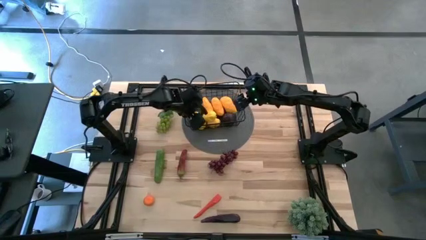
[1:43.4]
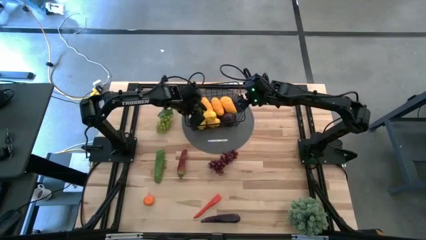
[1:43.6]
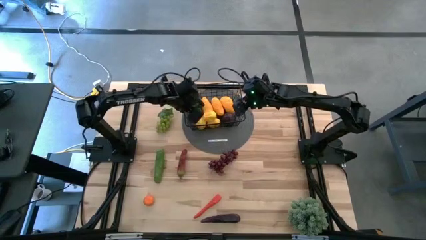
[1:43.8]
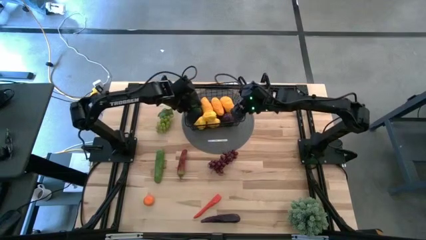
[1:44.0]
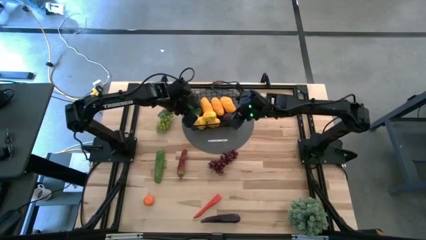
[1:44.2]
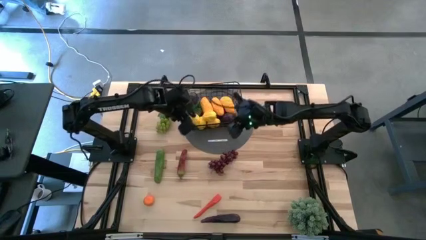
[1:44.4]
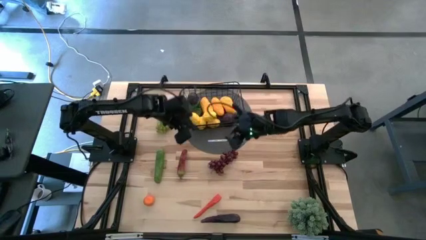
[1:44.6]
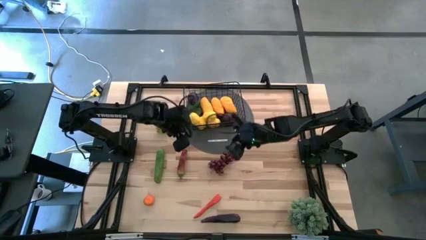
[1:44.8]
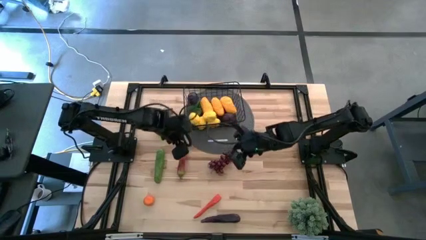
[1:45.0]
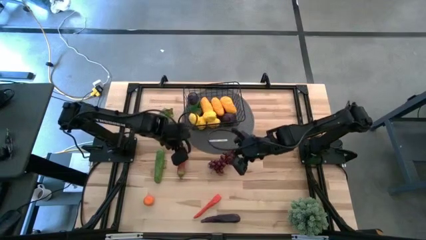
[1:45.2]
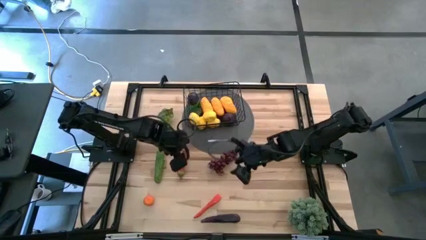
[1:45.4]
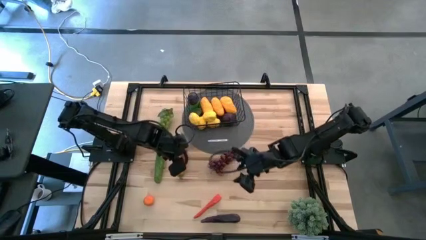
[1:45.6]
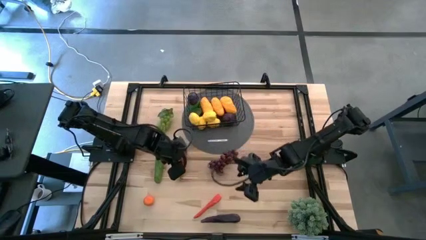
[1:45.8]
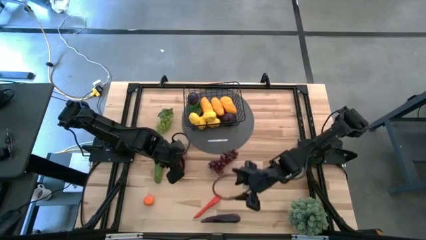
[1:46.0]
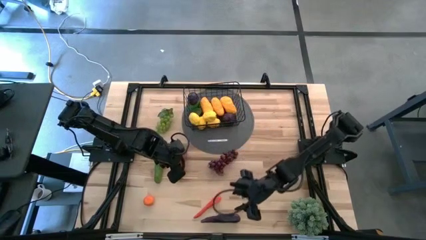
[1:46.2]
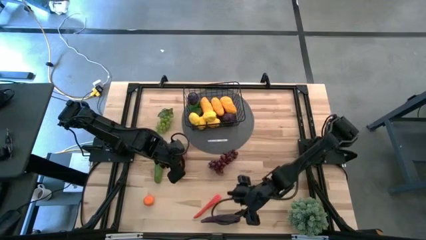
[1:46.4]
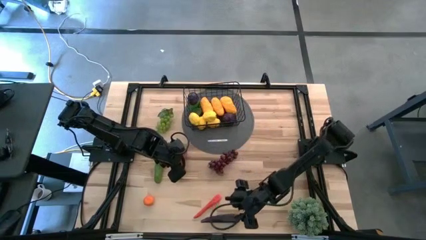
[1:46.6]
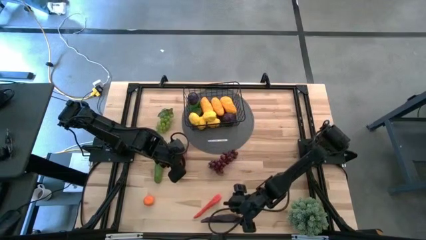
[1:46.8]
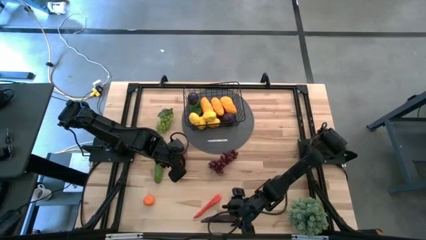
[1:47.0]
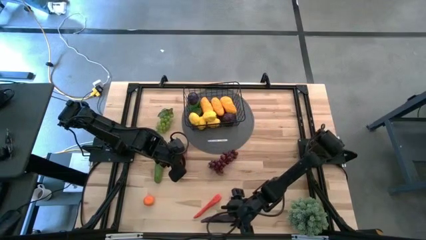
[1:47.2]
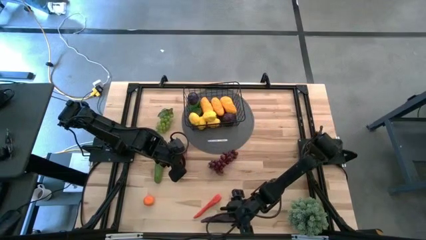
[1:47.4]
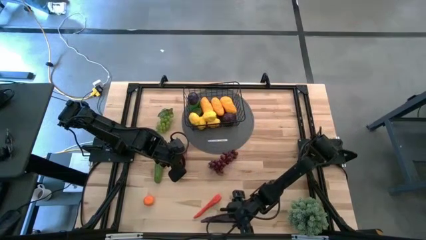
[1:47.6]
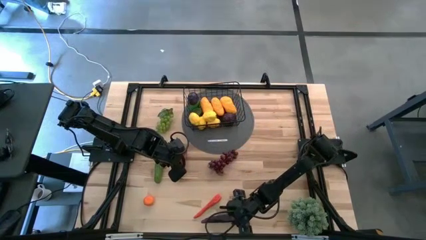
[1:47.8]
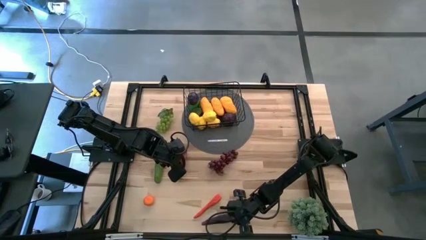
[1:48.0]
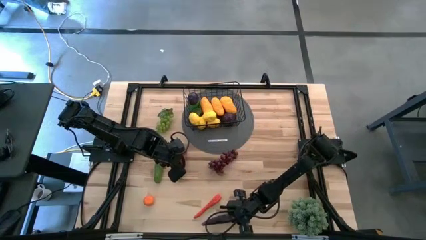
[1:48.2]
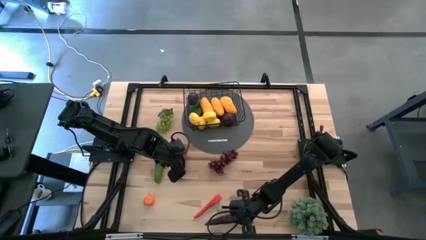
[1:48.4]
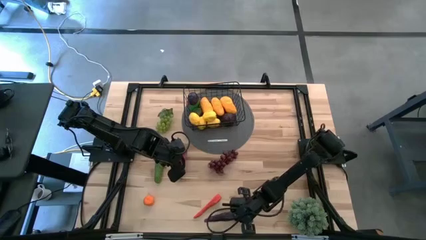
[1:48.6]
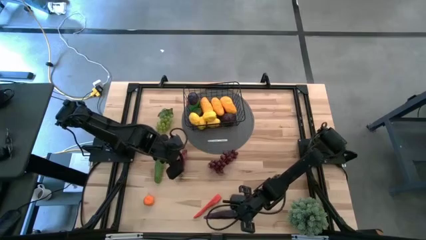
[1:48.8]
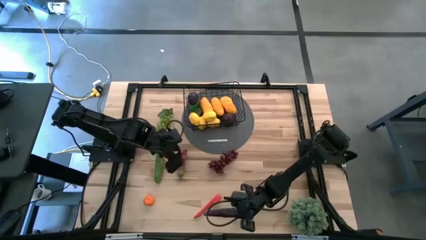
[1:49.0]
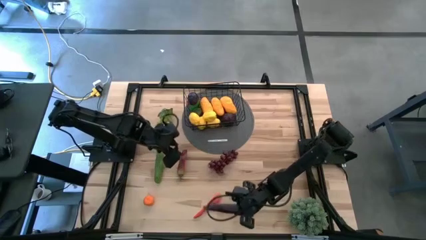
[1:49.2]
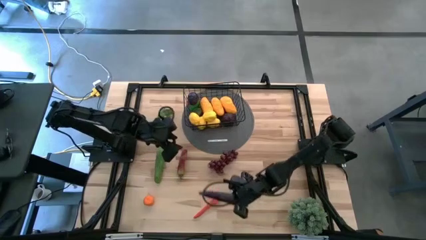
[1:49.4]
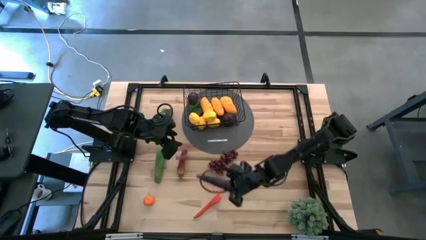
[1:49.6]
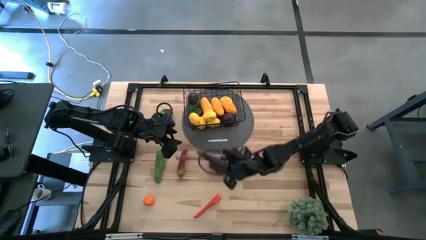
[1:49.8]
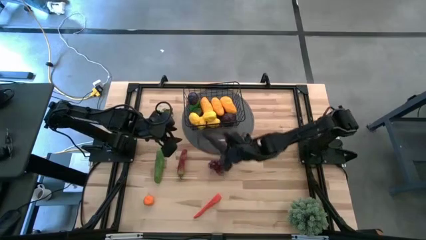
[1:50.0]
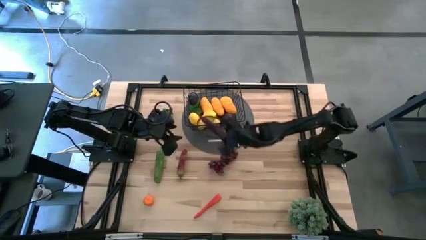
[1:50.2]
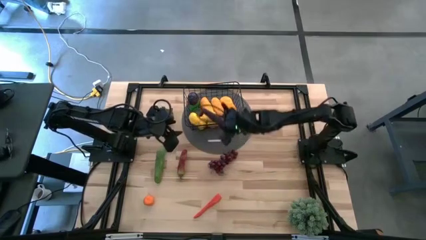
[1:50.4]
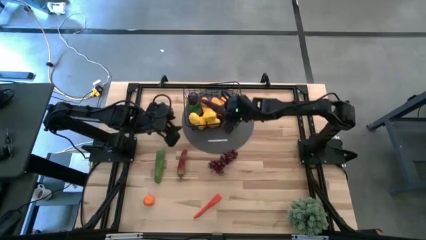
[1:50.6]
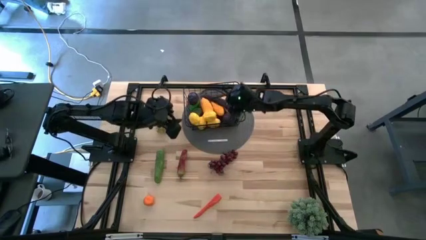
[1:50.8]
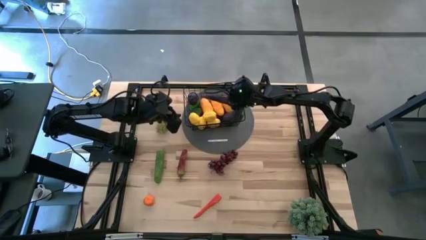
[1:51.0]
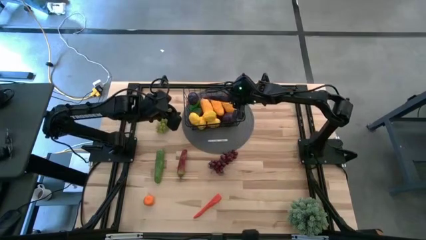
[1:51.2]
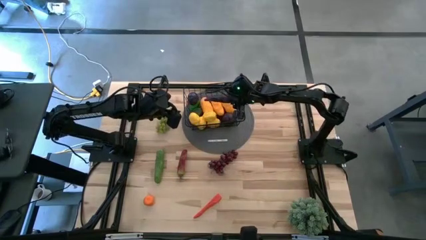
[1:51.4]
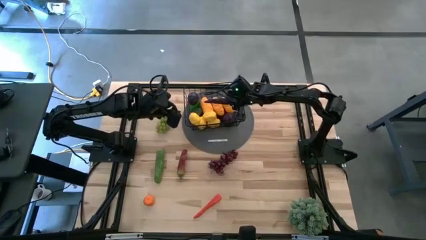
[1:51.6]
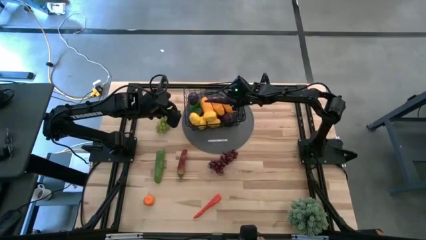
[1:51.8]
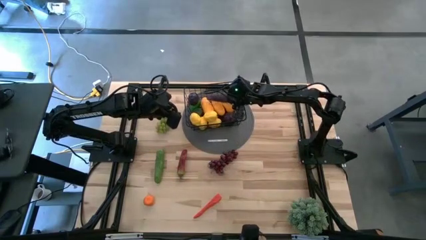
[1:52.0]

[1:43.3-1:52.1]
Task: Build produce basket
Put the eggplant into the wire basket

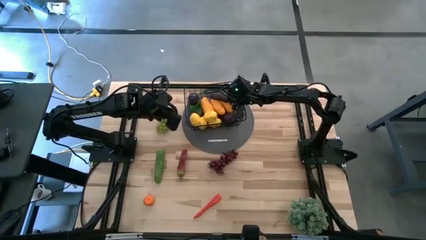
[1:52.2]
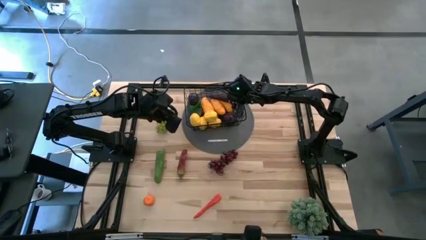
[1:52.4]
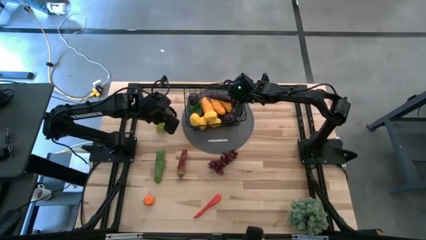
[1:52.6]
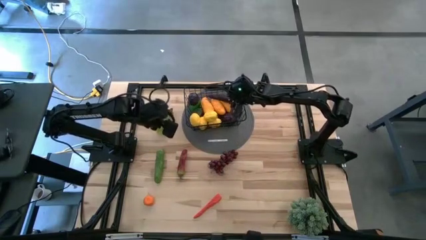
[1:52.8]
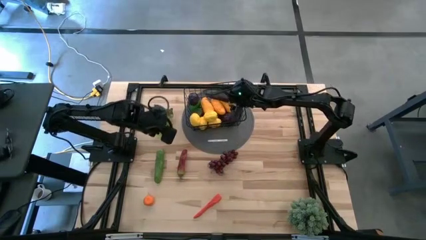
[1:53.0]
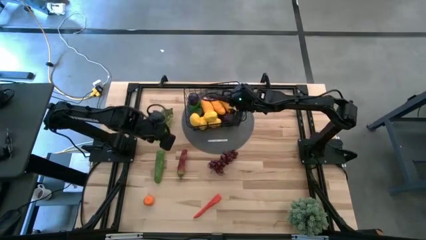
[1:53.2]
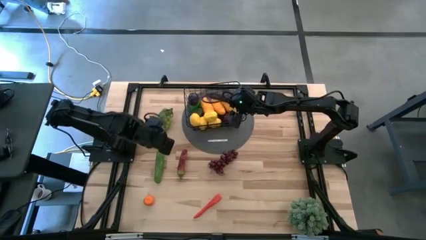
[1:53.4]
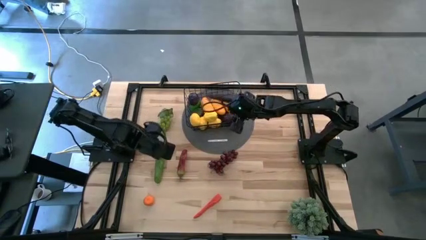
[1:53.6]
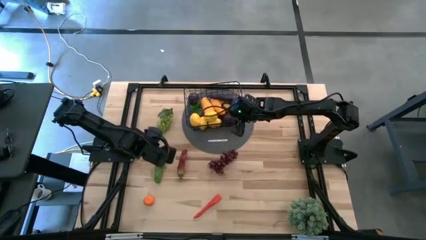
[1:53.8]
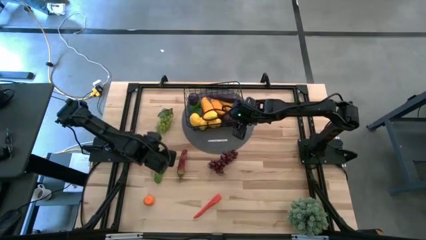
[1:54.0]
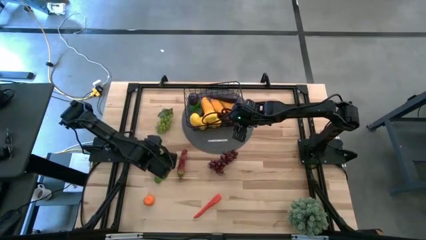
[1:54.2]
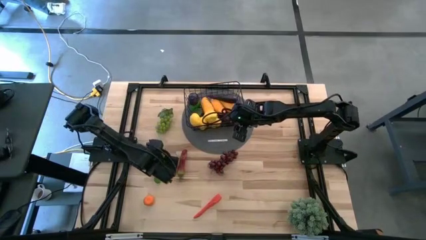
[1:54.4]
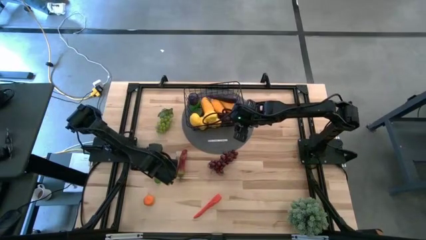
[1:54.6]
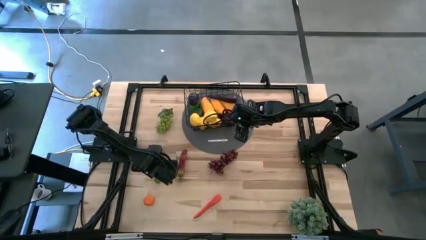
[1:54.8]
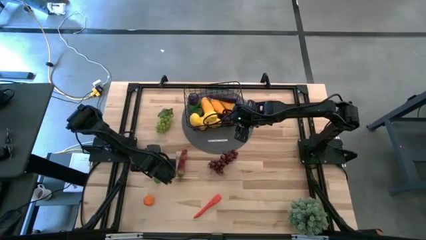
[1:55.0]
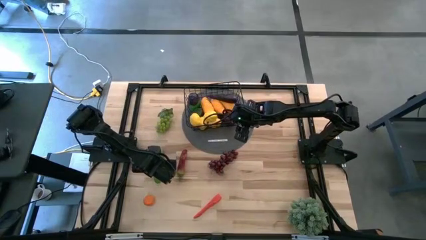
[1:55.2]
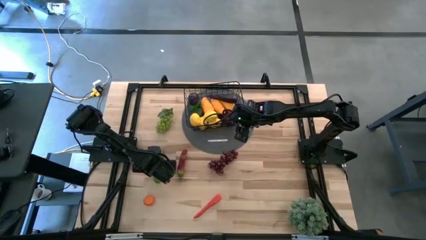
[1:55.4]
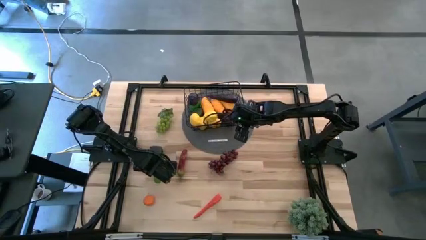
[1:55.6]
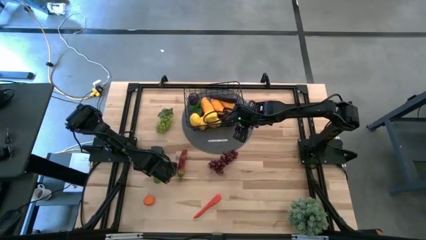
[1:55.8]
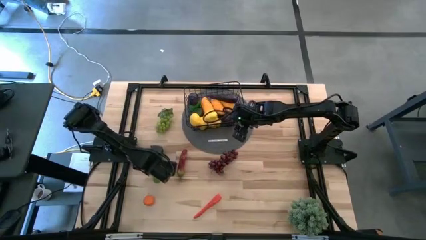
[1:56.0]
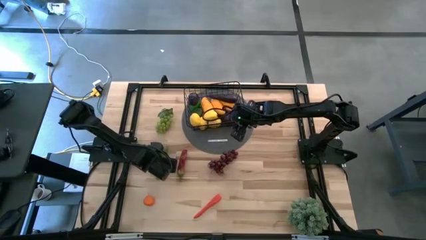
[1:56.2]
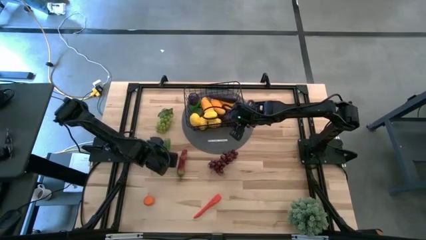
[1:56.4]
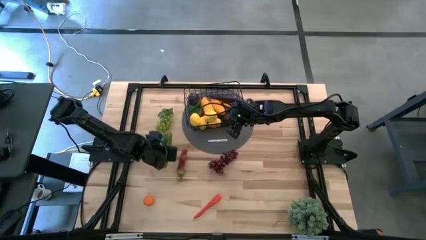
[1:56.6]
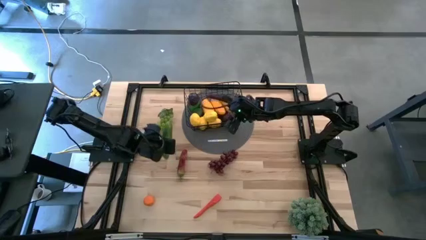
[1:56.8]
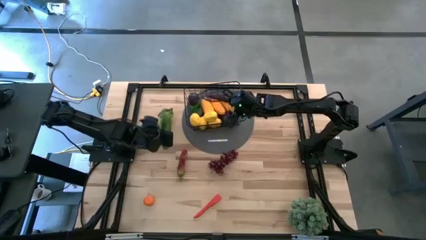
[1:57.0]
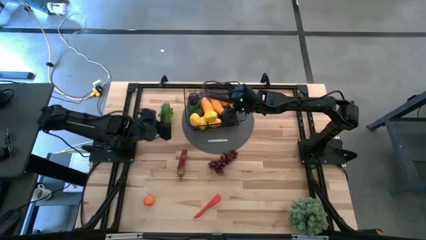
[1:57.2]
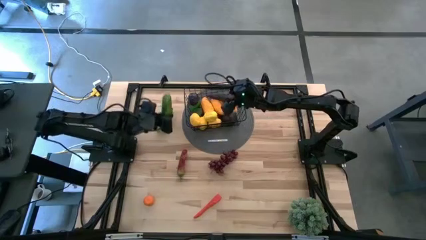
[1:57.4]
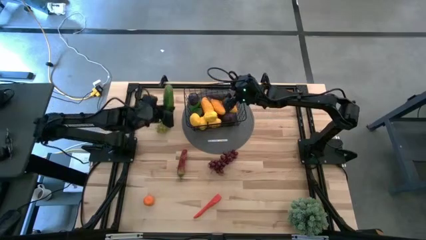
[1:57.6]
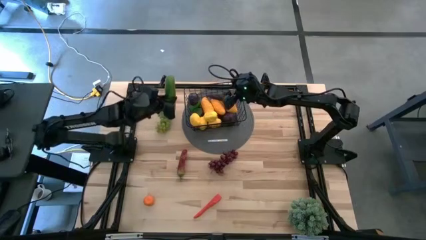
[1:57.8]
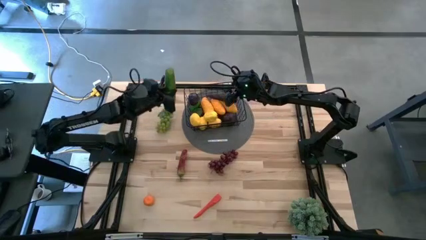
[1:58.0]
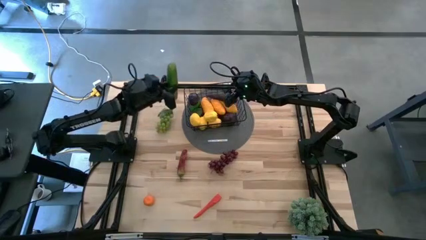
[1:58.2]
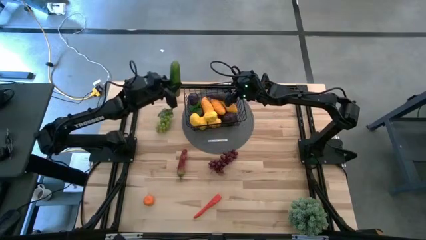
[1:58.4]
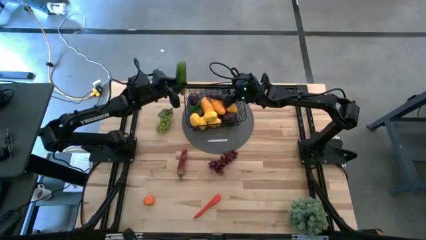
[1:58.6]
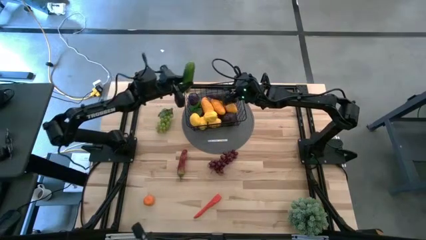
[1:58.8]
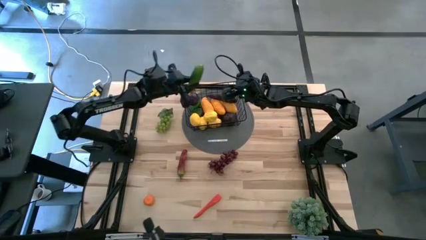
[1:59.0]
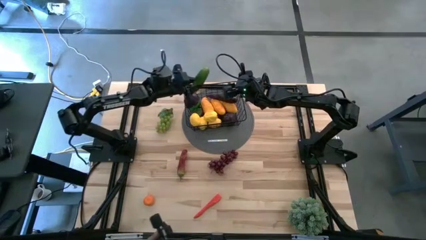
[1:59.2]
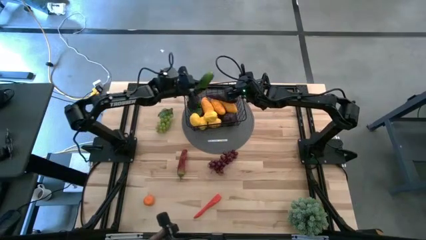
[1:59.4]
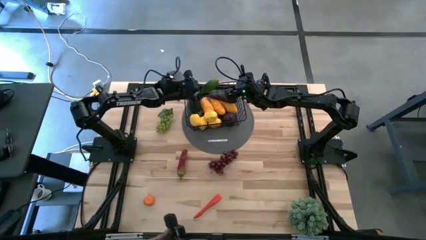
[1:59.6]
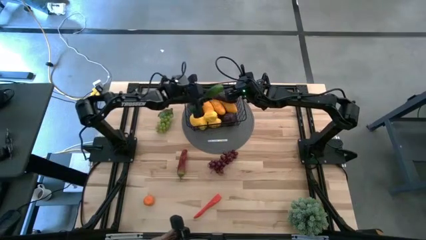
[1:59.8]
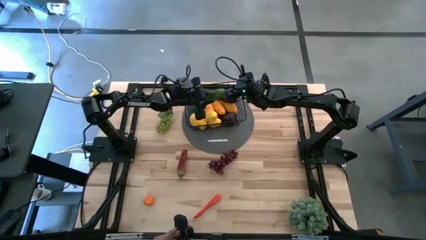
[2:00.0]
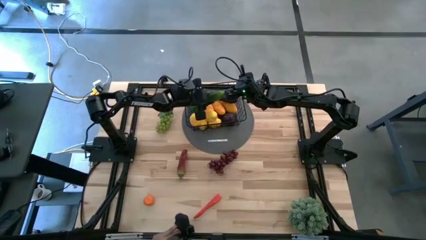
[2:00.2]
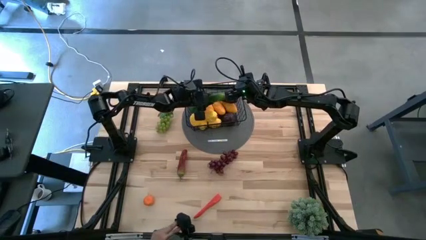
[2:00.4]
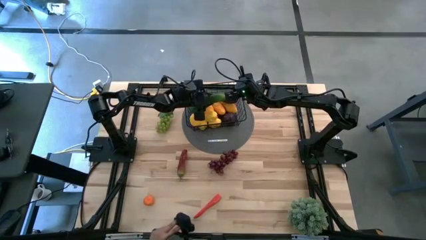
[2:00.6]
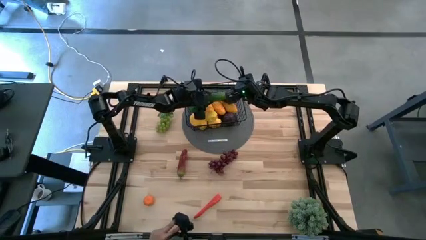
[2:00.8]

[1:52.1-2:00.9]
Put the cucumber into the wire basket
